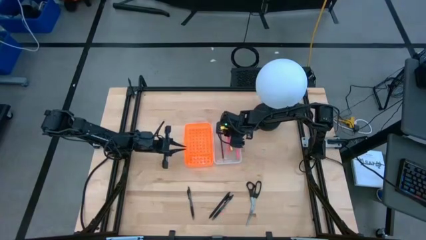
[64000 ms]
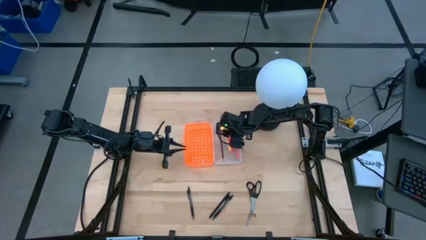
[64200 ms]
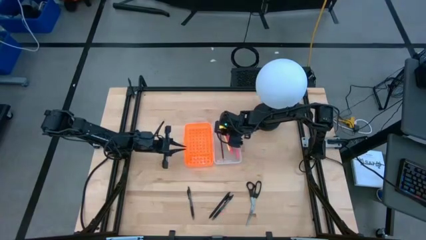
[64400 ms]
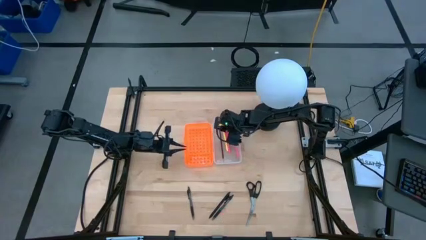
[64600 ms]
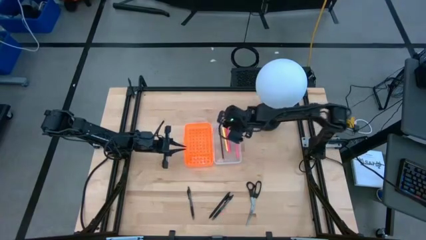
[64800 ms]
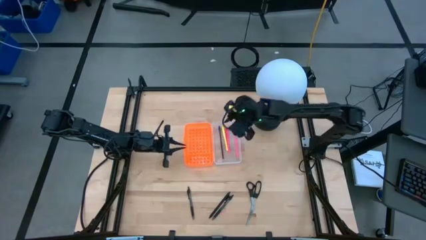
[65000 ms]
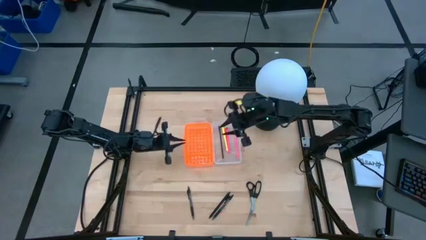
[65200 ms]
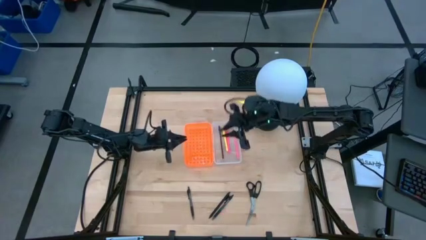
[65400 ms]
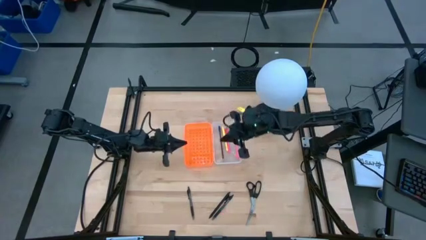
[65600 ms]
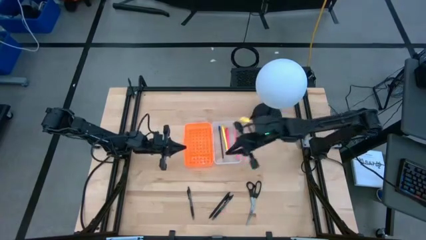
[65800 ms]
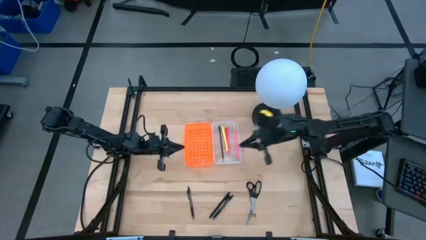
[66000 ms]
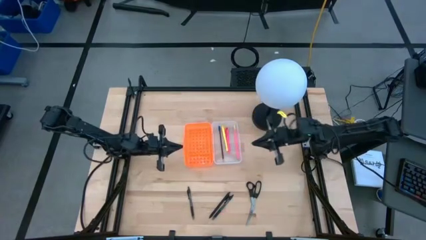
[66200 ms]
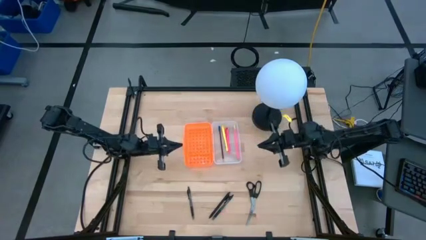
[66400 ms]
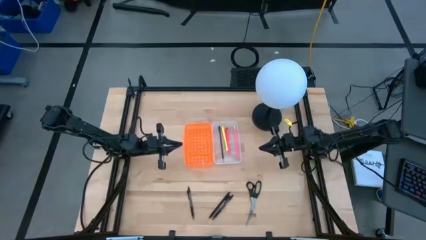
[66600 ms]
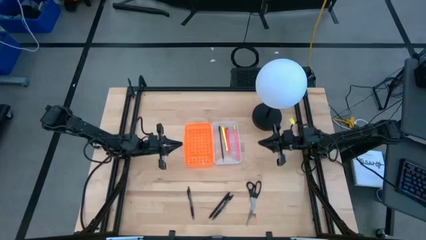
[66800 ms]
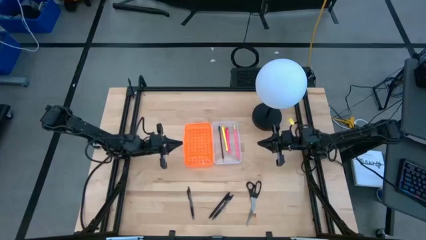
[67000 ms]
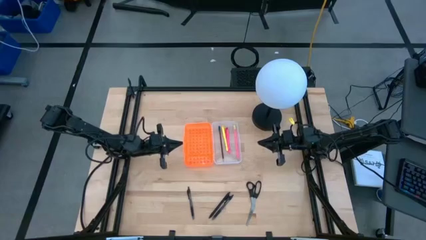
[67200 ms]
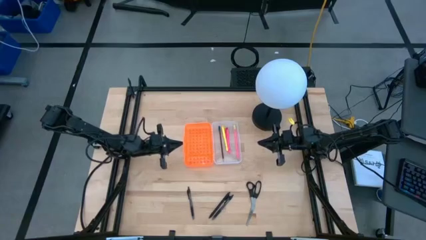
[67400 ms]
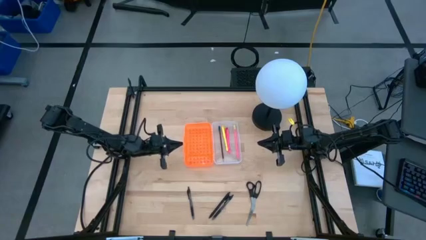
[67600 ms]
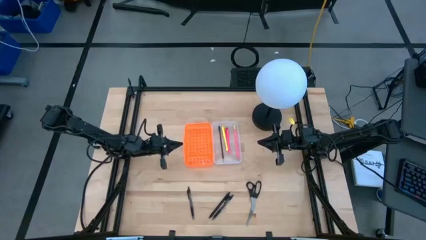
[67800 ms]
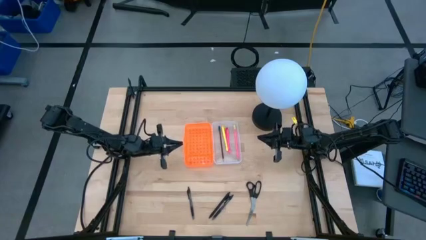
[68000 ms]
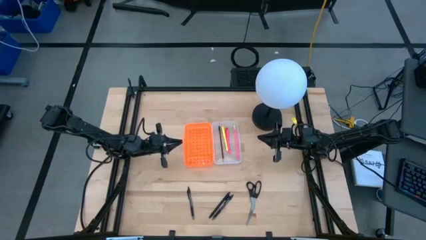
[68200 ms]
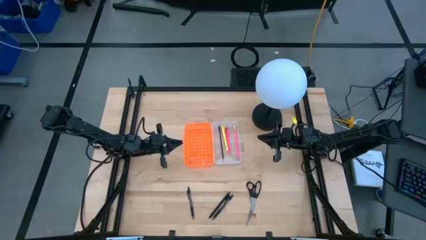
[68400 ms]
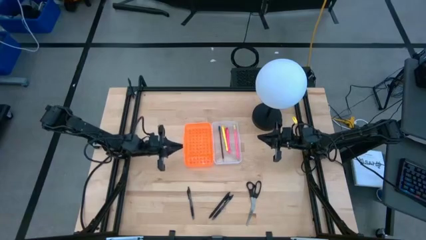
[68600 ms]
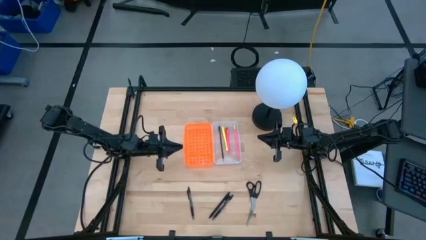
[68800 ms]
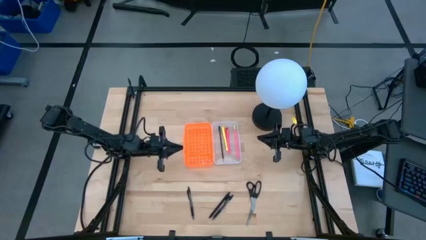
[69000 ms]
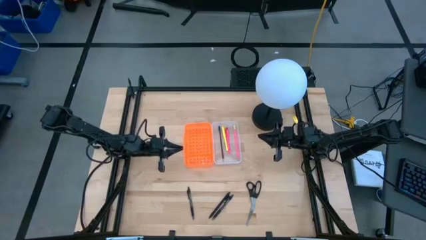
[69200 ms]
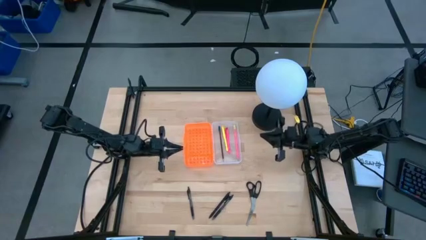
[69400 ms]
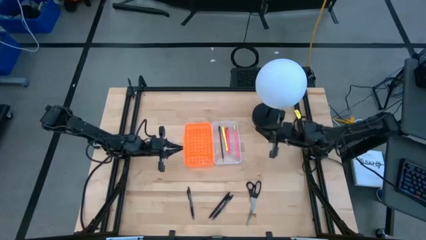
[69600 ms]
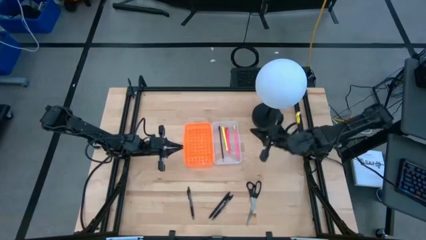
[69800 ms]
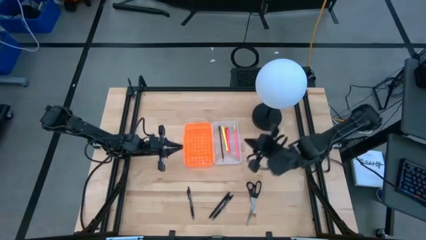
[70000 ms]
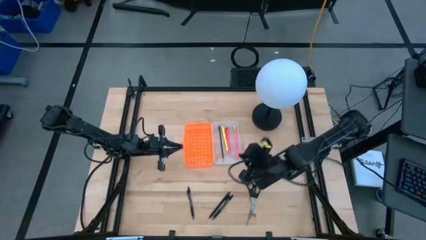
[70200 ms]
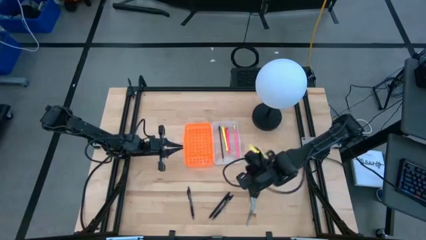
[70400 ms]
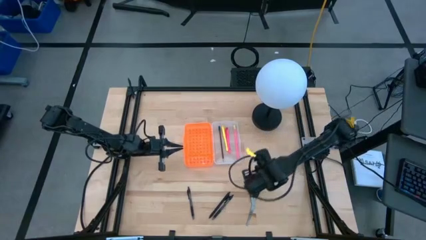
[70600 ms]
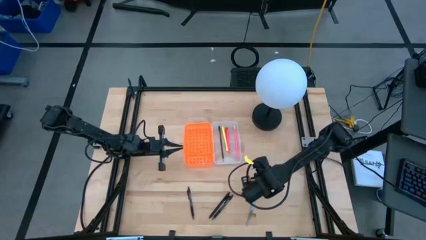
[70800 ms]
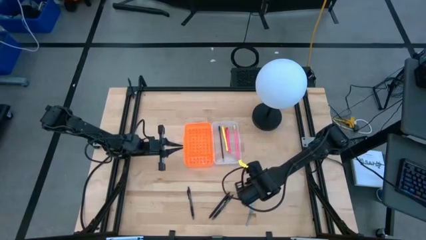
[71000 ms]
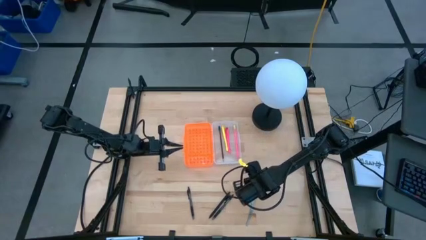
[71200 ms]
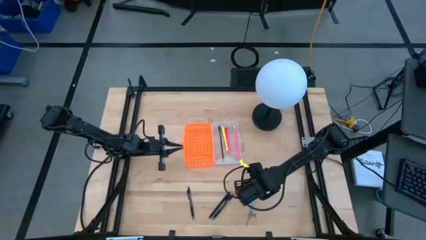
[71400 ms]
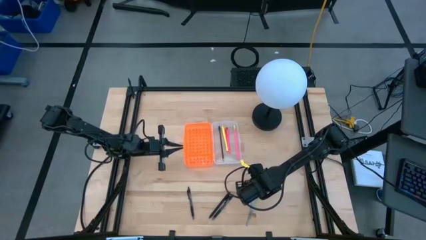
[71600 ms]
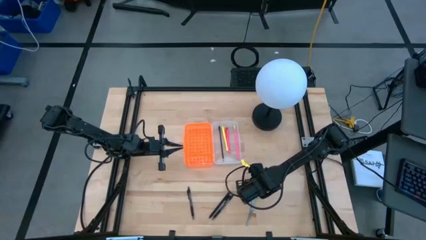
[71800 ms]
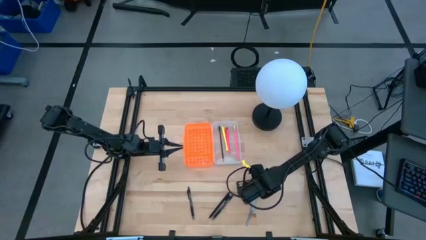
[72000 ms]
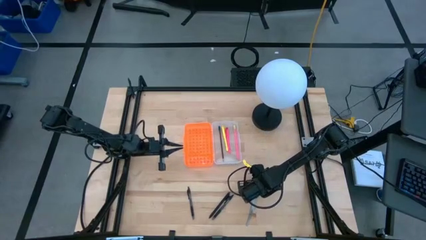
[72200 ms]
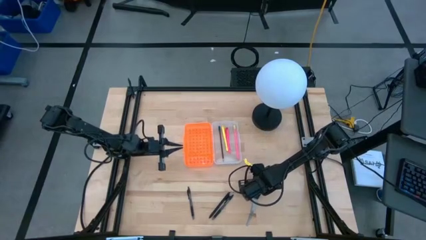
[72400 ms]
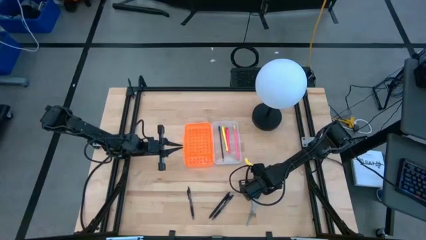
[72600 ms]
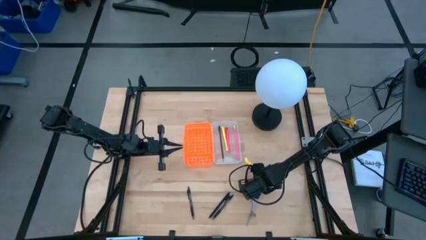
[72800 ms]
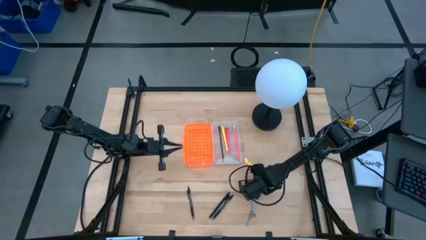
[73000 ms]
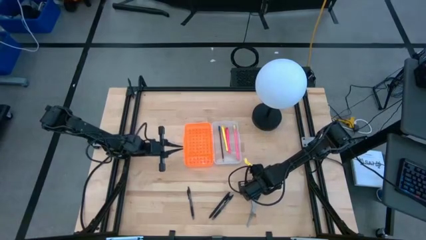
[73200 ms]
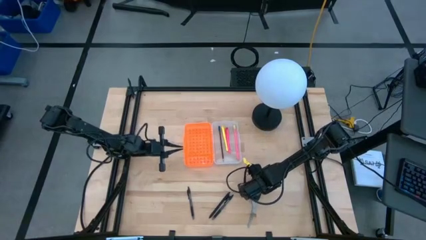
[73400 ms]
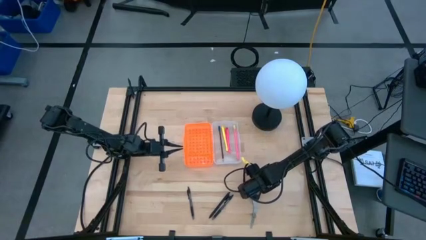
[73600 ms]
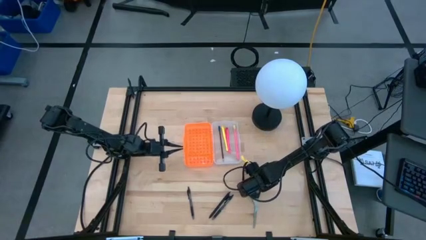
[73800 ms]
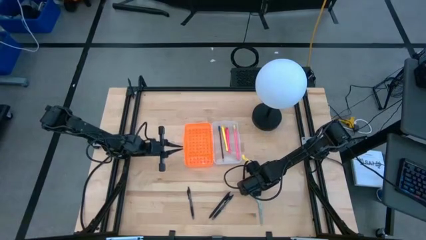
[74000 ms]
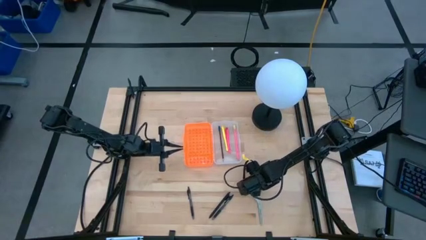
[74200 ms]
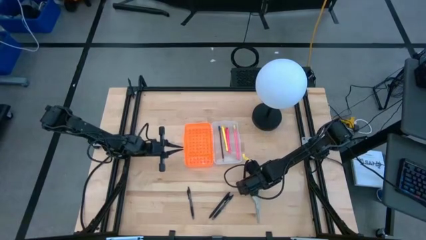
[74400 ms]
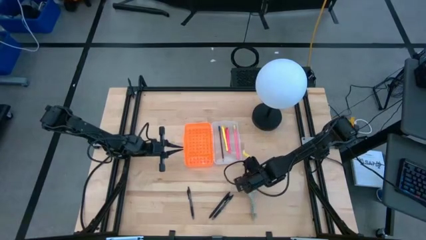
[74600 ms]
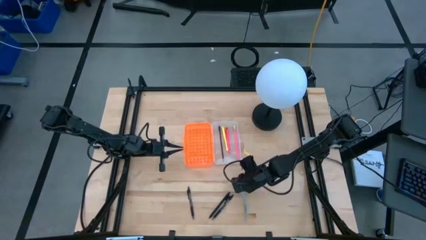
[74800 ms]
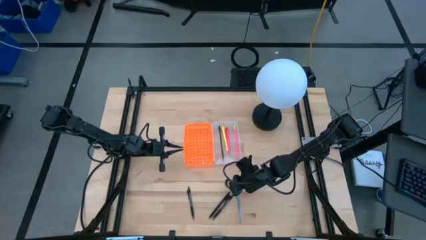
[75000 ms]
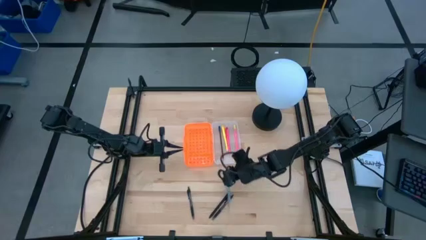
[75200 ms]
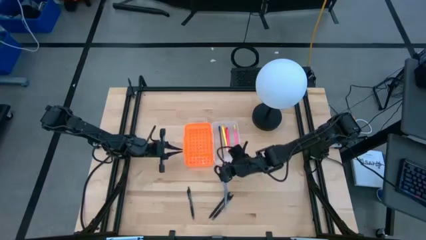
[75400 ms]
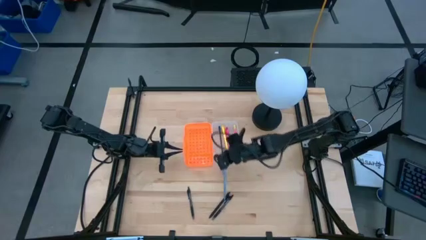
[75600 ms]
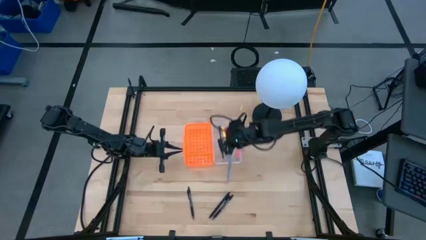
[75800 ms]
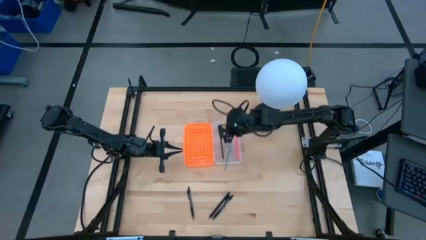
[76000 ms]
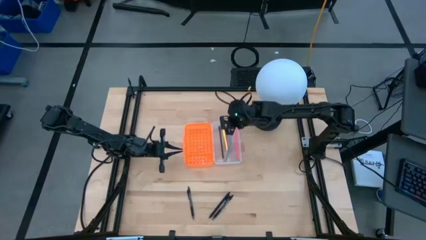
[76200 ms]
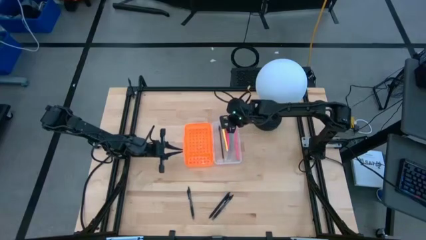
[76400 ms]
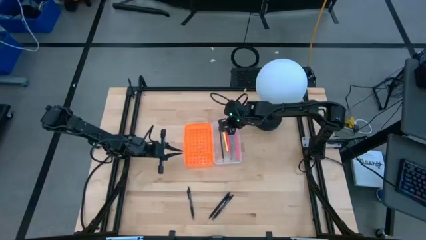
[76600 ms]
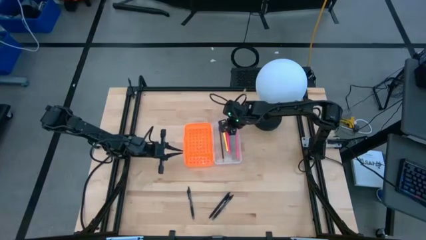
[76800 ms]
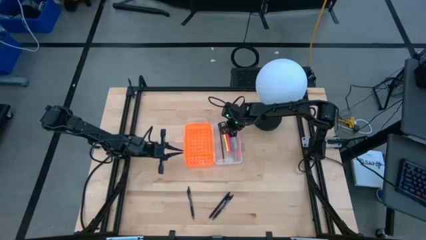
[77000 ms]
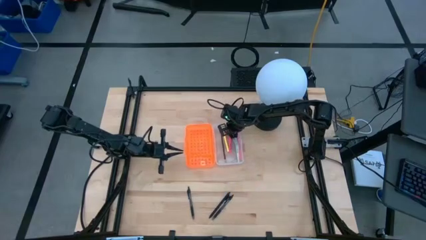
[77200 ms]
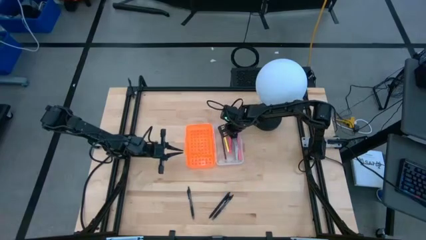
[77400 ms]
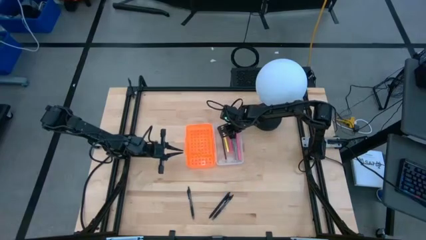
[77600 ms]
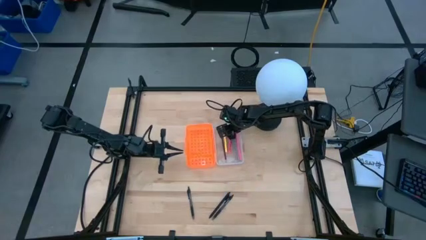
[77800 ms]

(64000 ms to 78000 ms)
Task: Pick & place school supplies into a supply box
Put the black scissors into the orange supply box

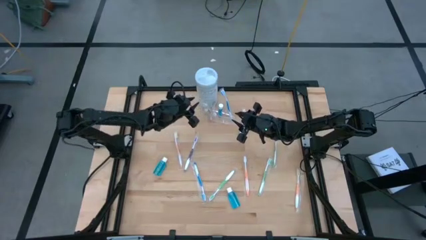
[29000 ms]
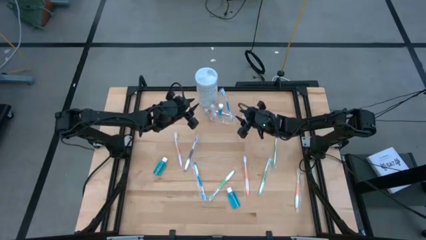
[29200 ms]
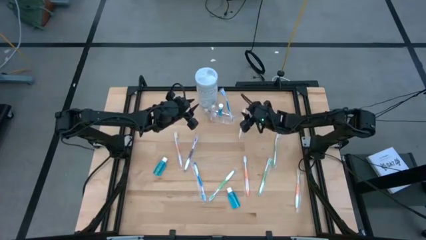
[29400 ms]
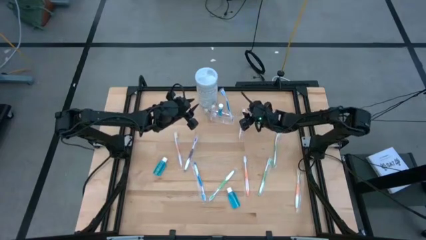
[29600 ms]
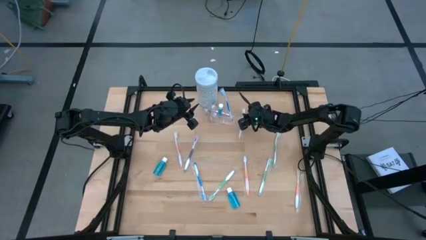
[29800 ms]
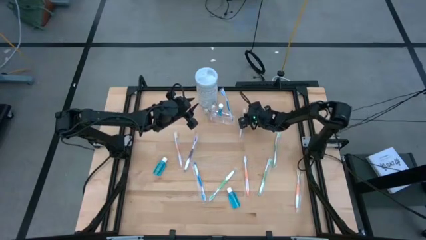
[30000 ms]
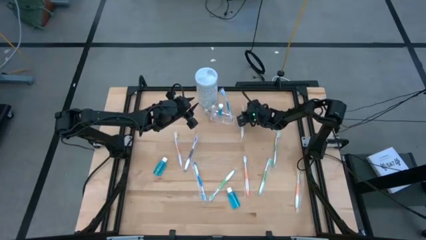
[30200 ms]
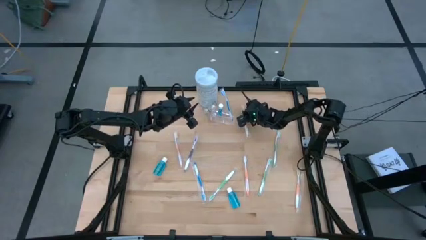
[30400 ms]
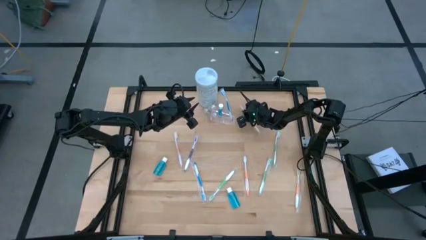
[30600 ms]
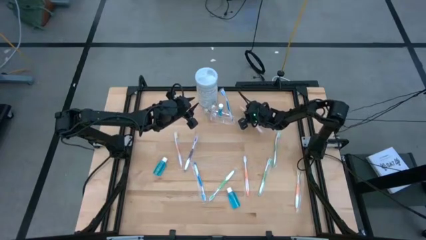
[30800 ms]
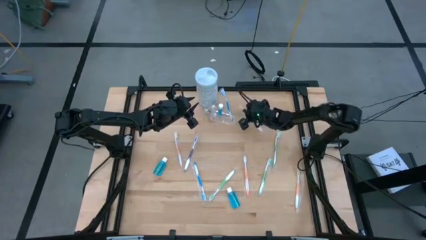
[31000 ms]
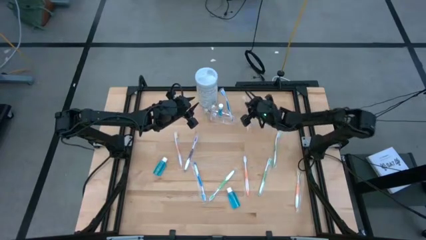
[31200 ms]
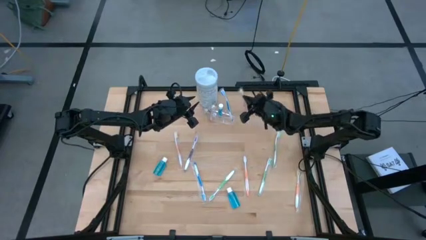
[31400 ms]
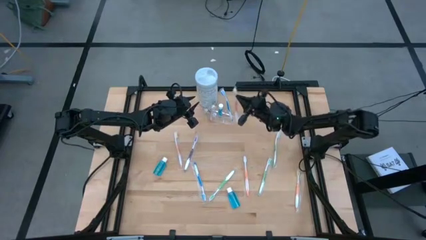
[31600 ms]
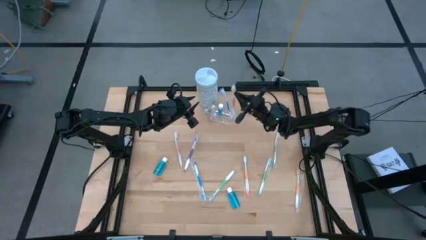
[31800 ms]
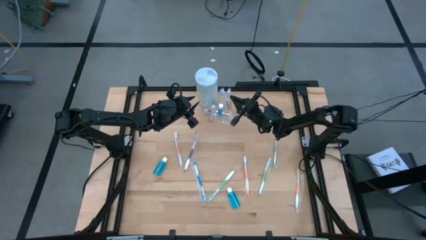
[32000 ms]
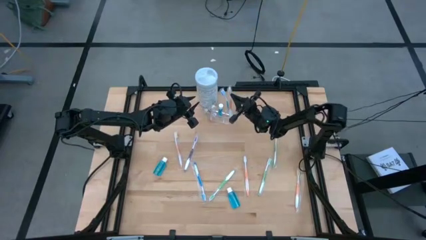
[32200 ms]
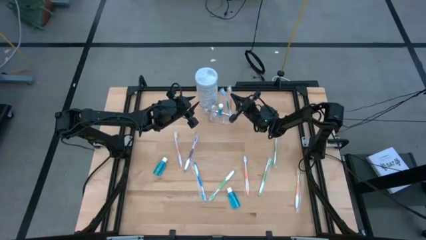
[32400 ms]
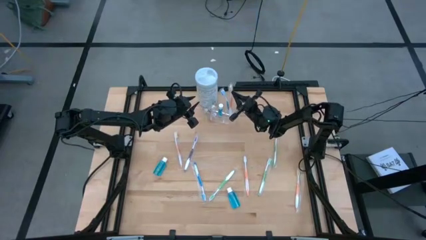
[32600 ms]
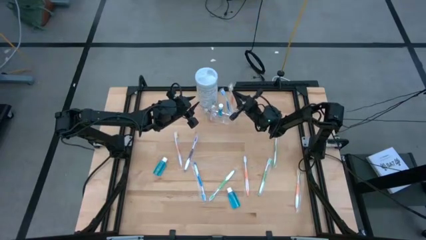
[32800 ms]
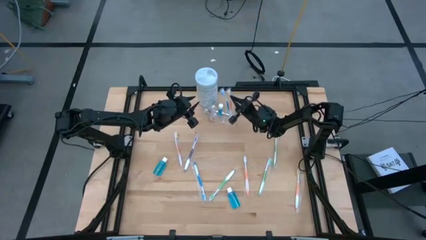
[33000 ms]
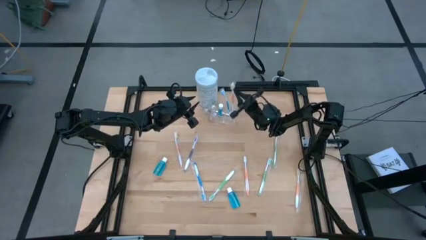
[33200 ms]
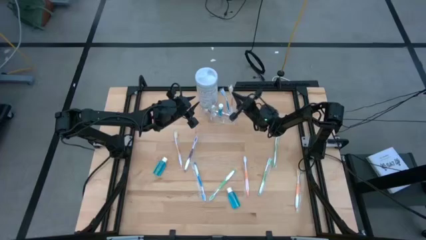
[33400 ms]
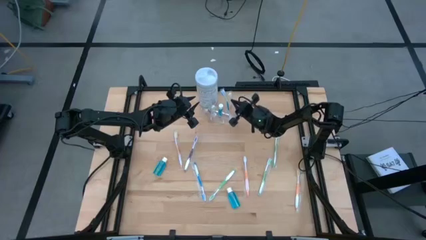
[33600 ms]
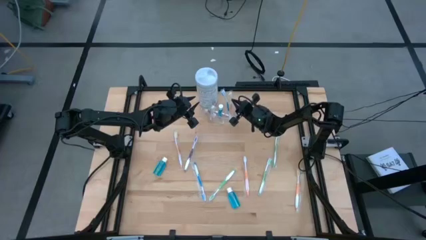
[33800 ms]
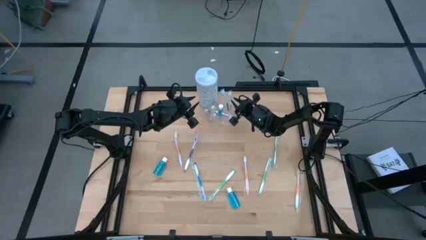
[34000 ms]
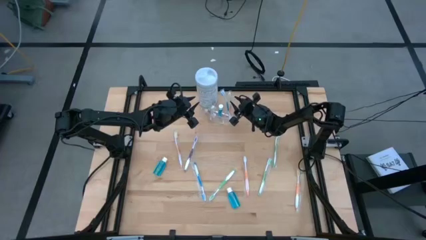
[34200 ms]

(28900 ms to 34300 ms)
Task: Pick & Place toothbrushing station
Put the orange toothbrush into the transparent organizer
